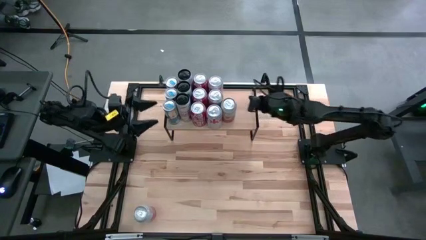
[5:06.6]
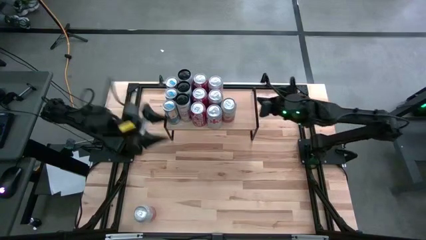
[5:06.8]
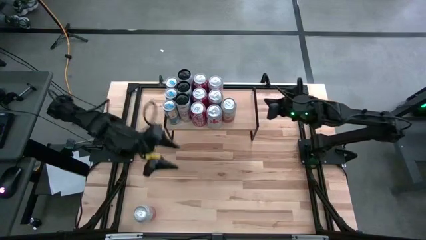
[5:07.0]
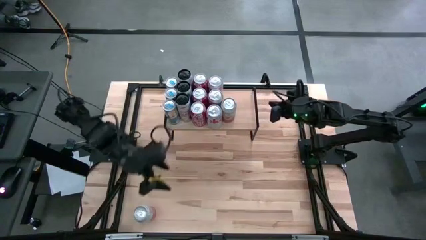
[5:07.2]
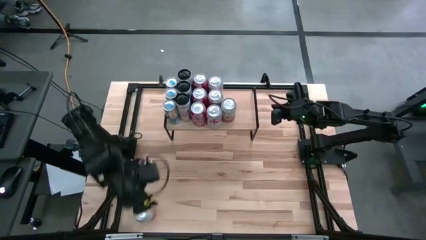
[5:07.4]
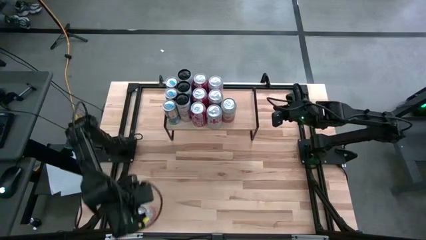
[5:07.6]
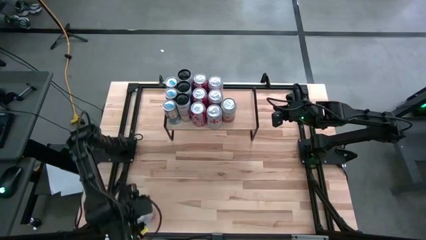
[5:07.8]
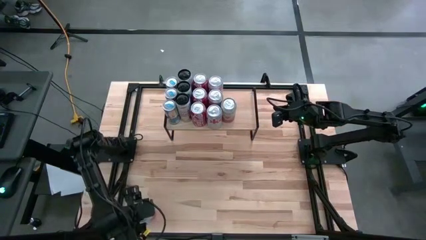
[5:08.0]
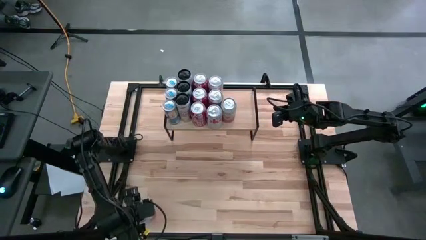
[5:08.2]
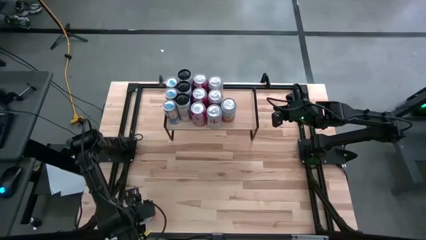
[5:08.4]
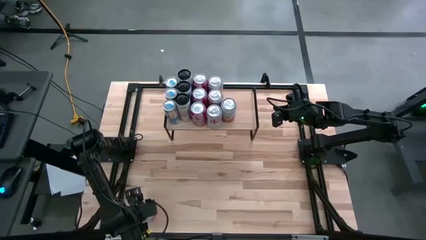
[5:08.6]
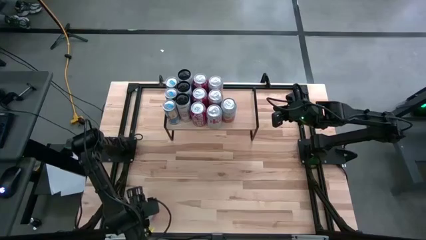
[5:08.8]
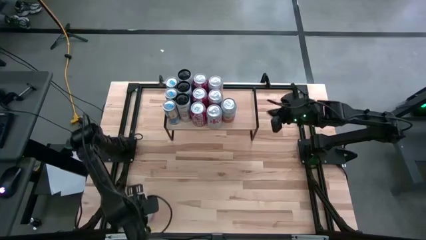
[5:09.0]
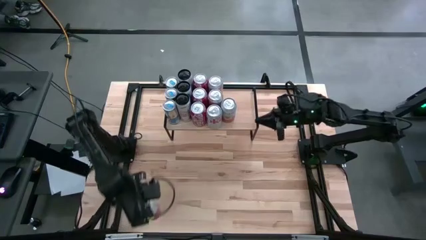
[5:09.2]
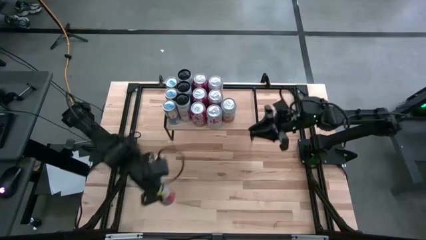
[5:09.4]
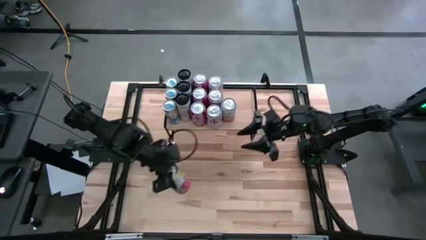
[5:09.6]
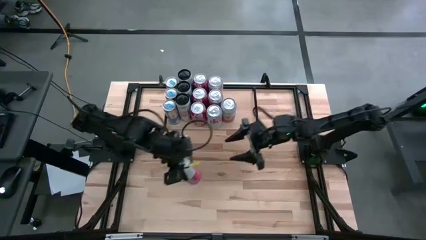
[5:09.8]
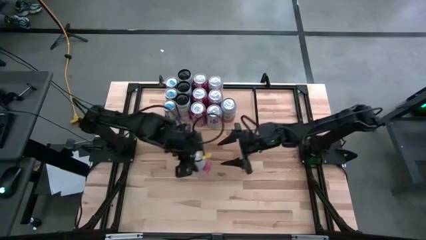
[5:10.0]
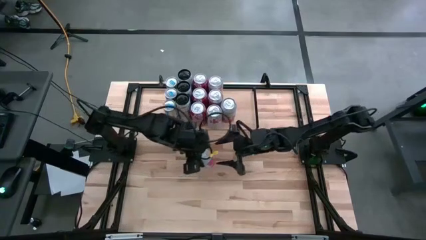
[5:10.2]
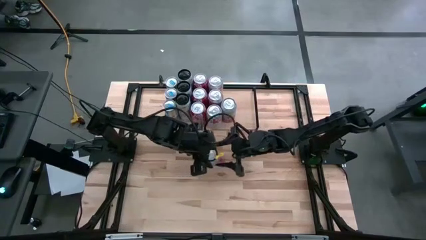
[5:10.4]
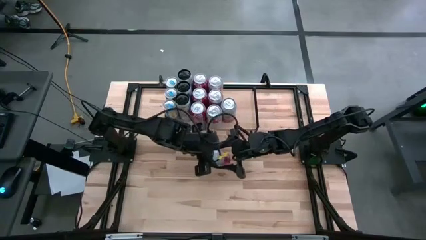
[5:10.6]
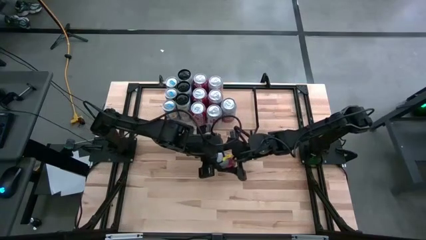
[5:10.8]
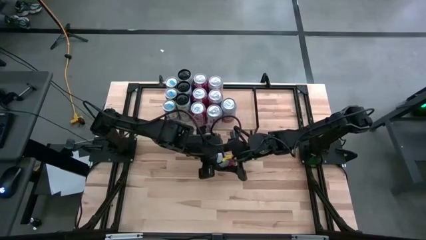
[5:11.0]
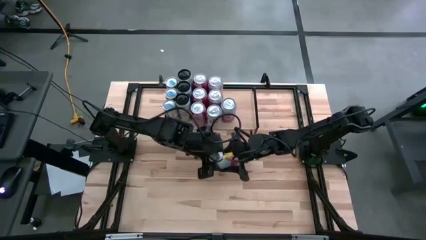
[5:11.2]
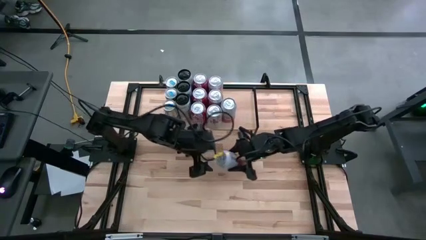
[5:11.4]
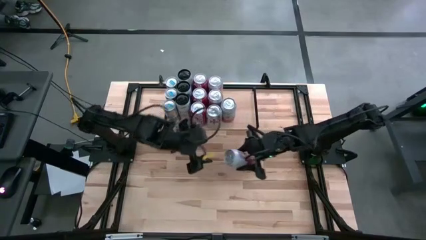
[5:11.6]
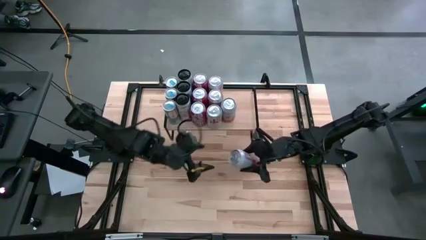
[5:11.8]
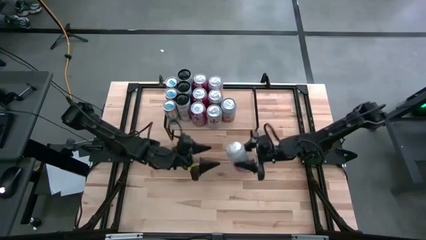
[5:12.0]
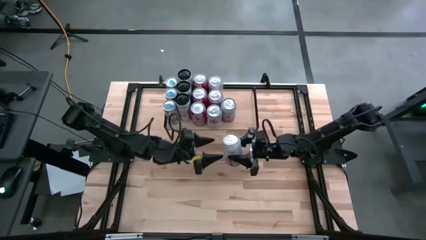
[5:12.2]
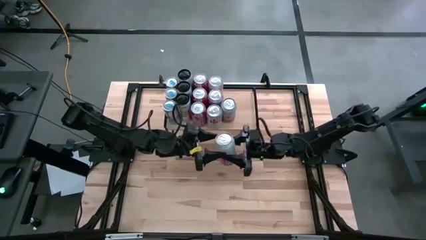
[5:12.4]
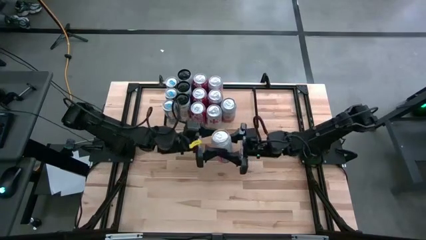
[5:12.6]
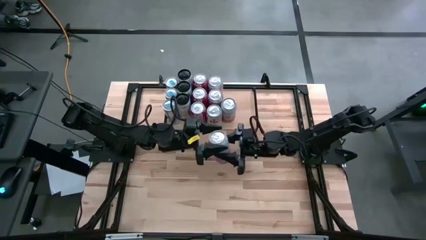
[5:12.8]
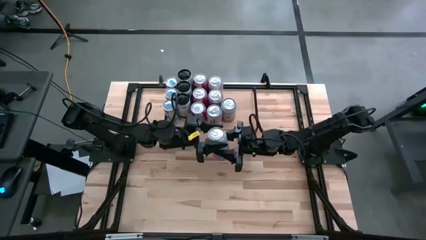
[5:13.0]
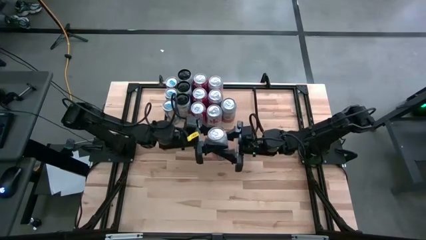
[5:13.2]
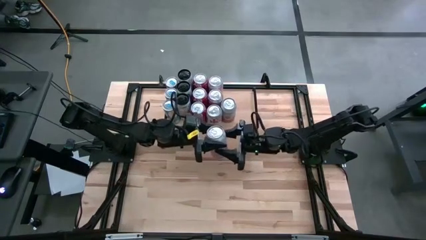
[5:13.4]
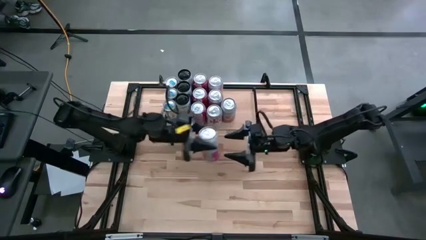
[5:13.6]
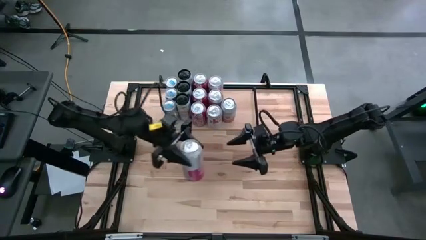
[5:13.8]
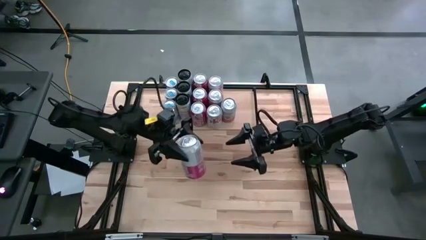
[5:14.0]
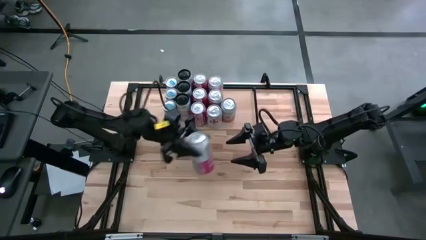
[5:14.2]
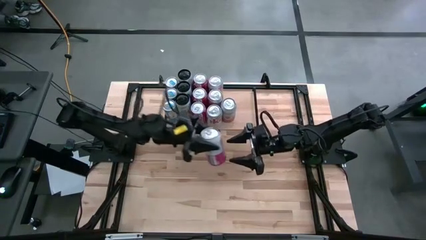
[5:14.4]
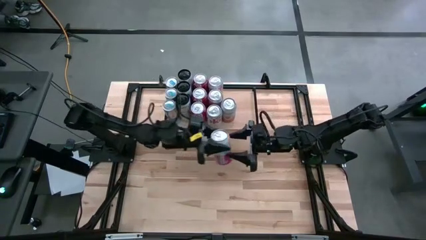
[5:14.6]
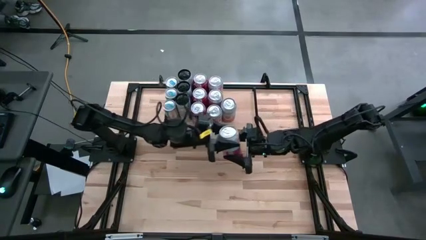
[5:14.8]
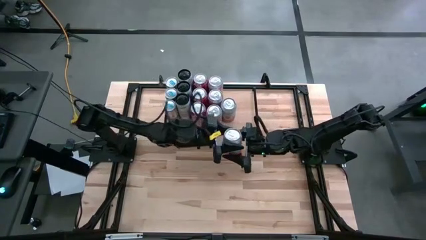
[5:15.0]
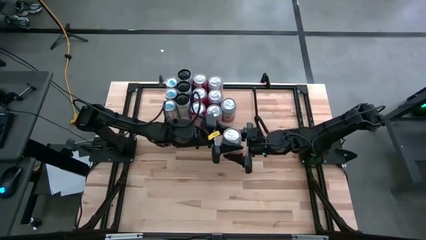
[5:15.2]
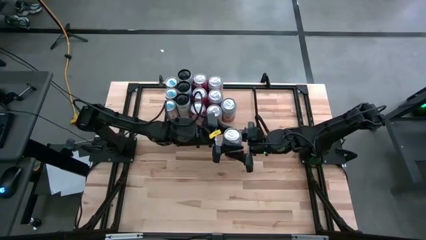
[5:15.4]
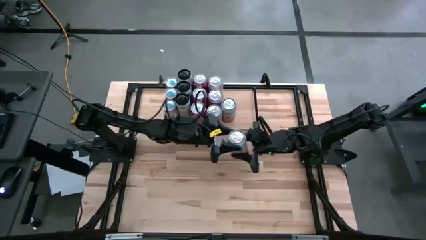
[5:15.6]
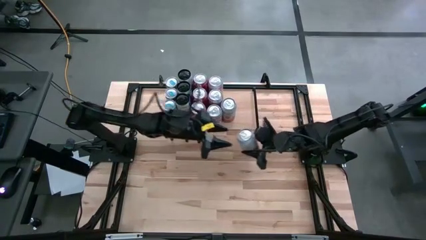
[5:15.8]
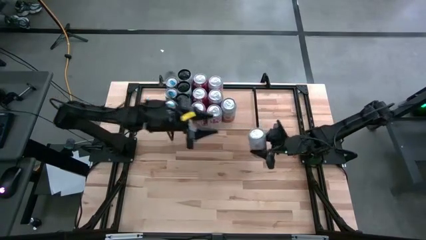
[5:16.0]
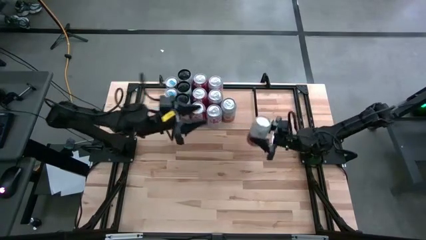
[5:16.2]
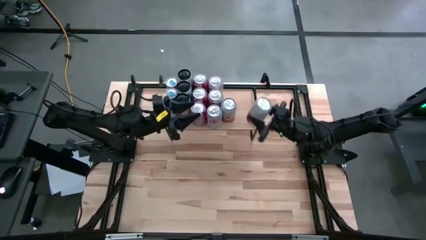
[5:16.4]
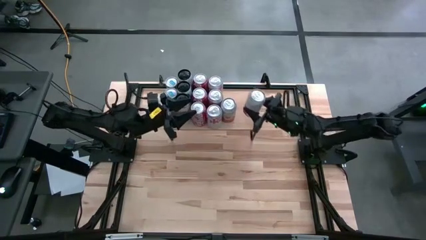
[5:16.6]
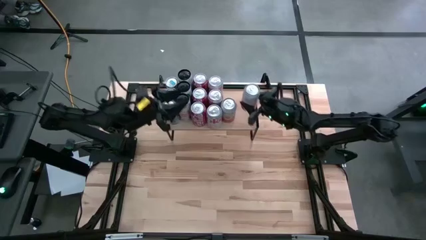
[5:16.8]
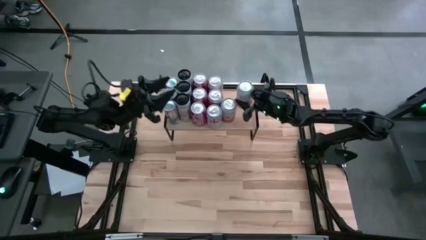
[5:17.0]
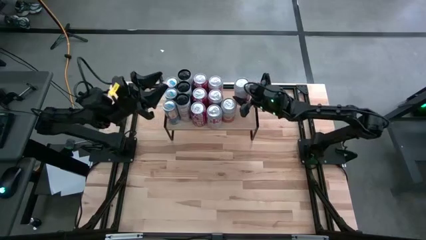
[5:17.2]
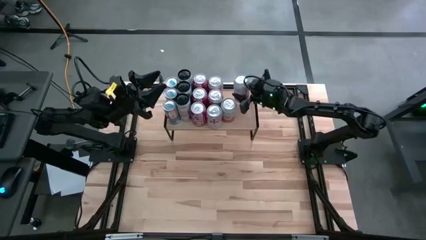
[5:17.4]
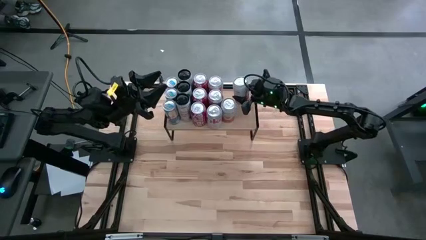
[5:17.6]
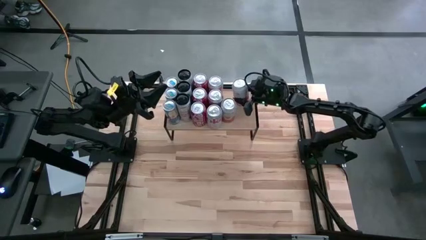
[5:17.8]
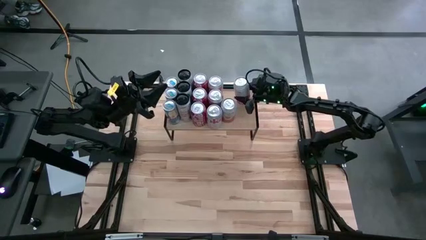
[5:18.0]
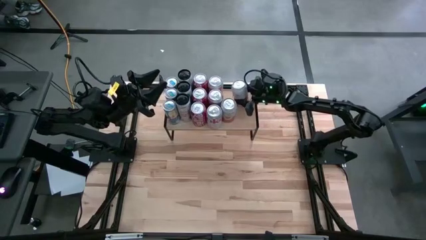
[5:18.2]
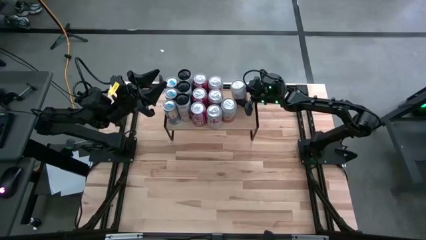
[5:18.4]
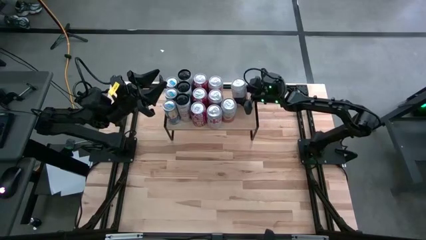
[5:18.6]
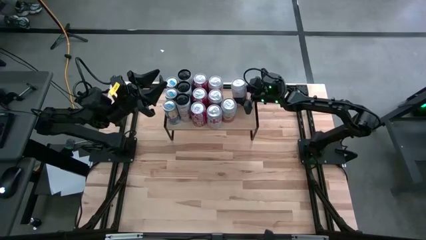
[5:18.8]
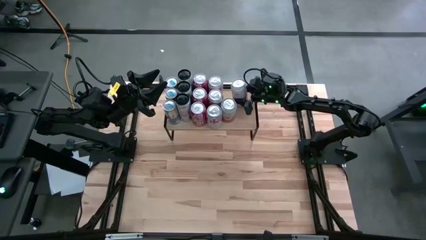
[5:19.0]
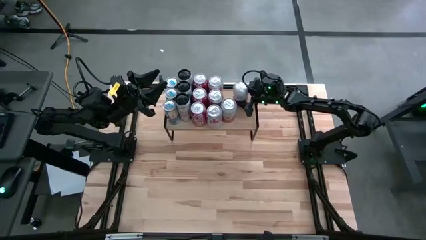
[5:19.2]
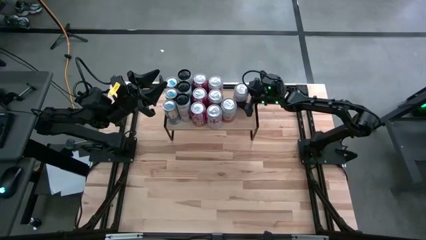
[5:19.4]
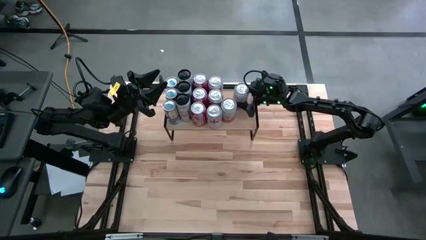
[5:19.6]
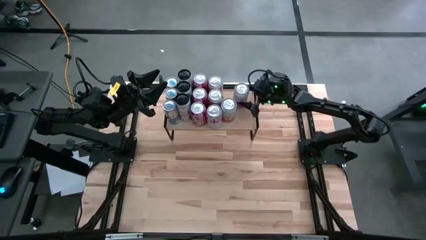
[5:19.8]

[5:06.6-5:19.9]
Task: Place canned beverage on shelf
Put the pink-white soda can aligned with the other pink-white soda can on the shelf

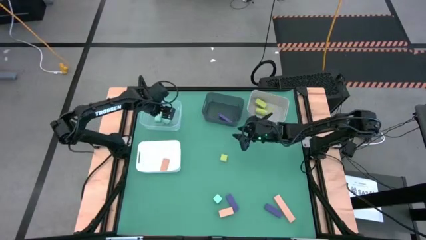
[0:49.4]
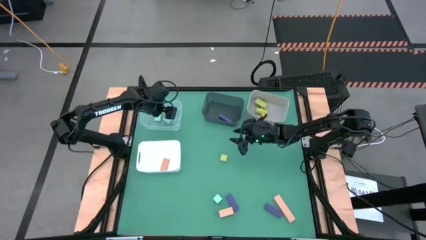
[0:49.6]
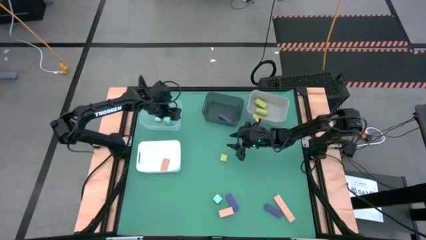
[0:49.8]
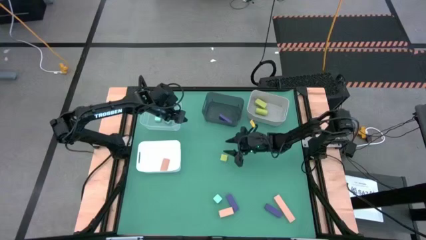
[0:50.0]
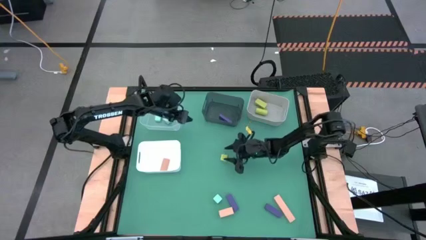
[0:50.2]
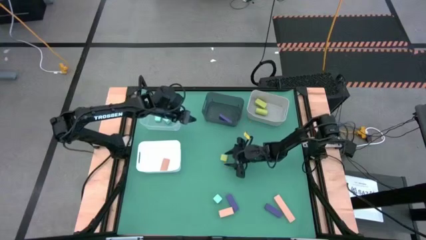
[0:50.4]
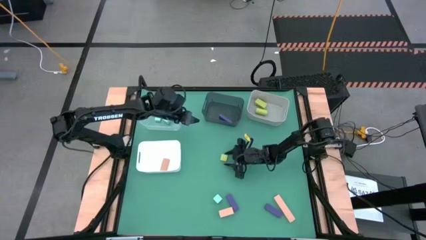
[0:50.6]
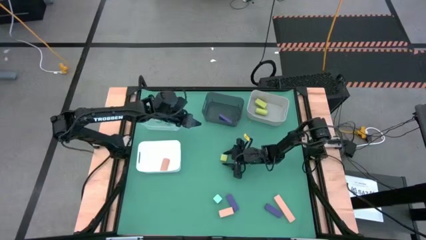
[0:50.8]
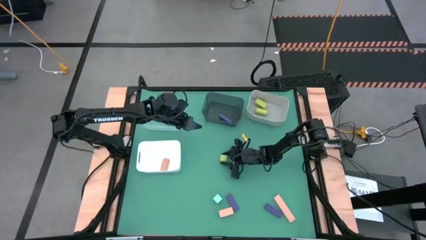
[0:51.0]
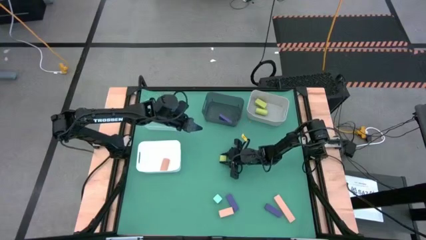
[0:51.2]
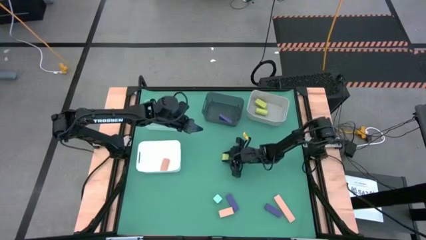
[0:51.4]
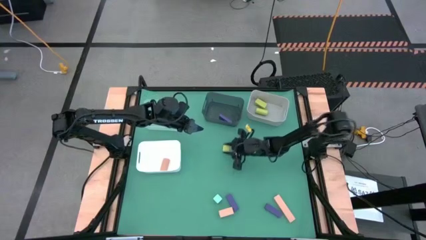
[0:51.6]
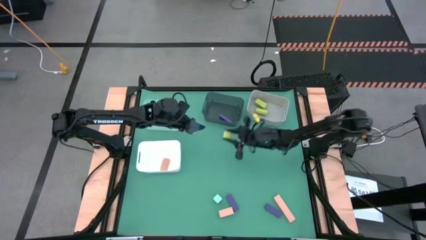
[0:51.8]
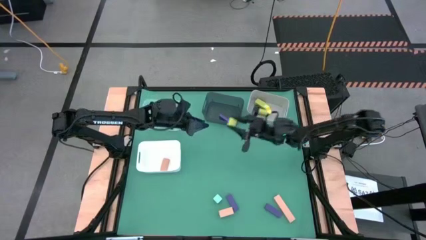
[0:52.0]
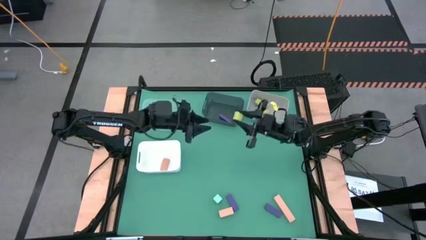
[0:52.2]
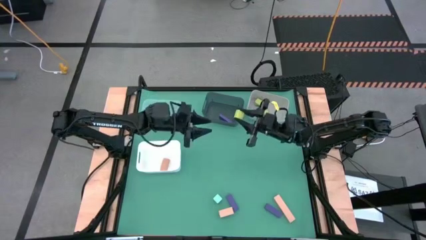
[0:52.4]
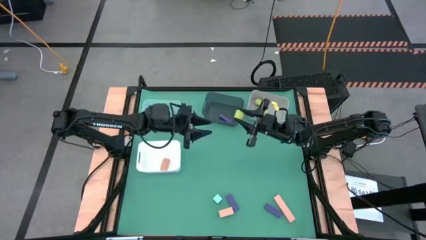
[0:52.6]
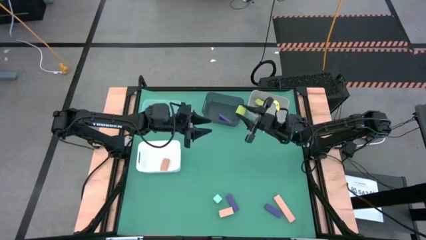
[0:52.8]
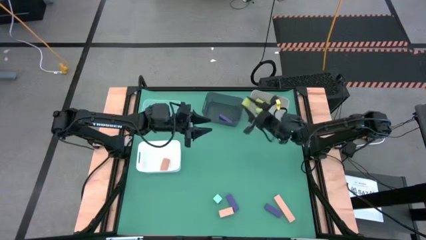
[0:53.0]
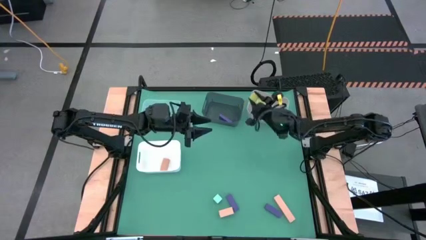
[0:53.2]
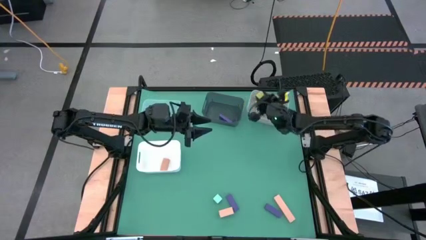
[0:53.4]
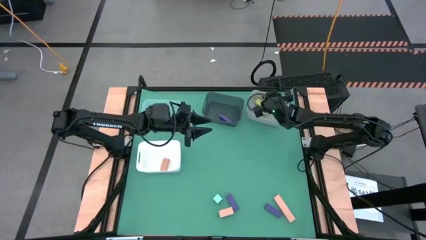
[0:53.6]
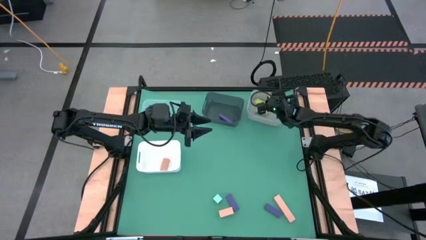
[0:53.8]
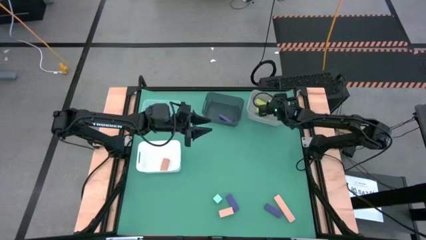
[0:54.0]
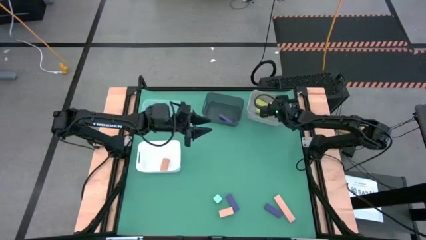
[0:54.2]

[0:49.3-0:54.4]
Task: Sort & place blocks by color
Put the green block into the gray bin
